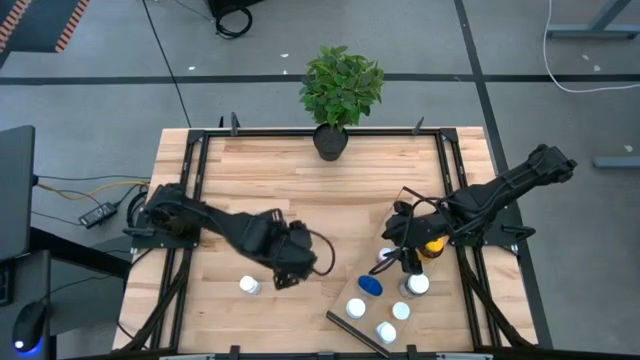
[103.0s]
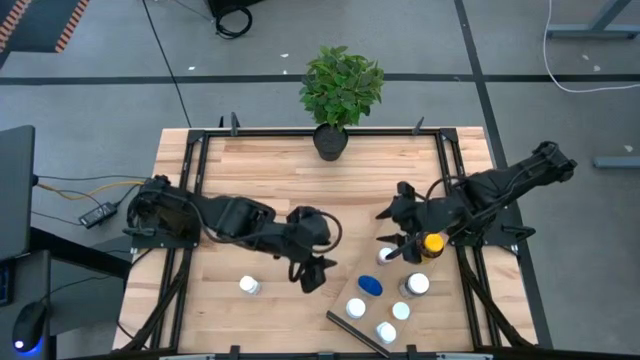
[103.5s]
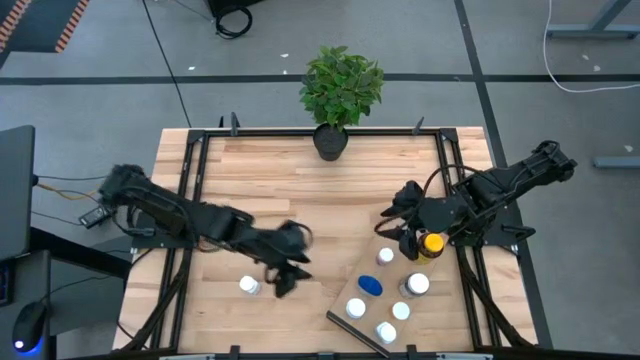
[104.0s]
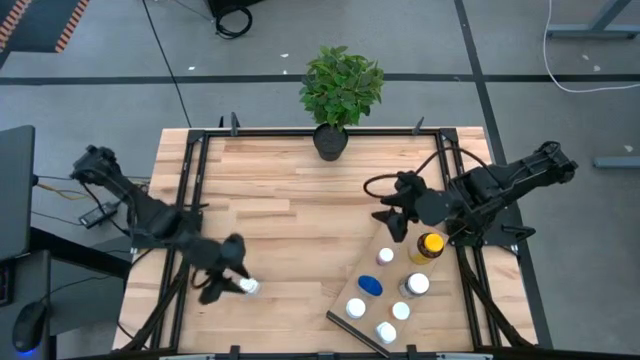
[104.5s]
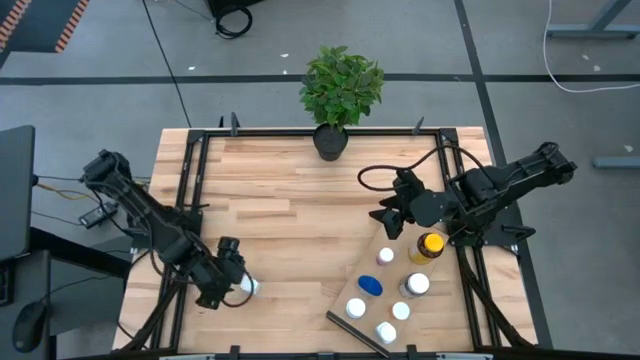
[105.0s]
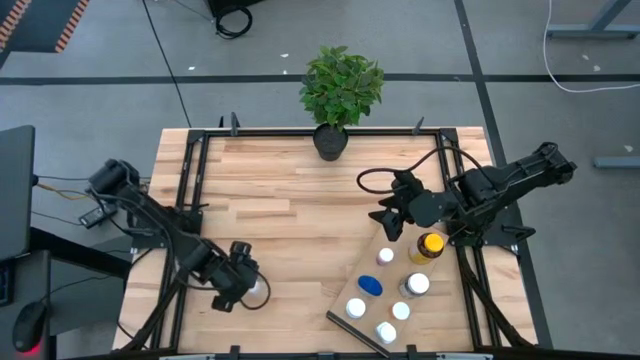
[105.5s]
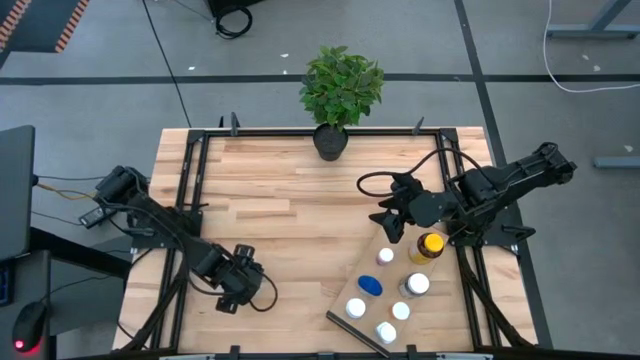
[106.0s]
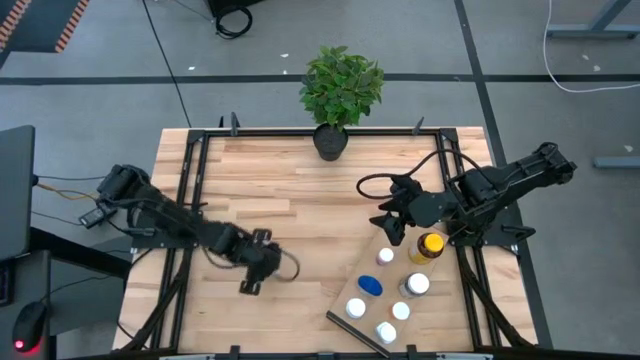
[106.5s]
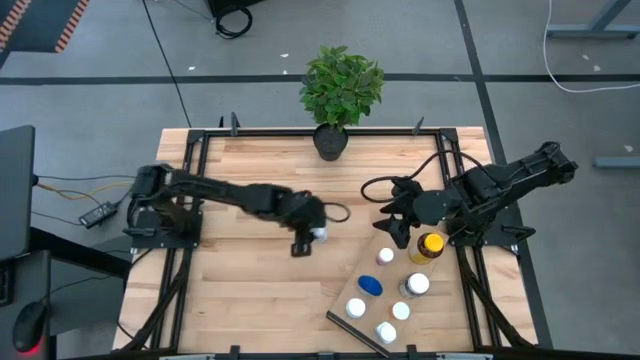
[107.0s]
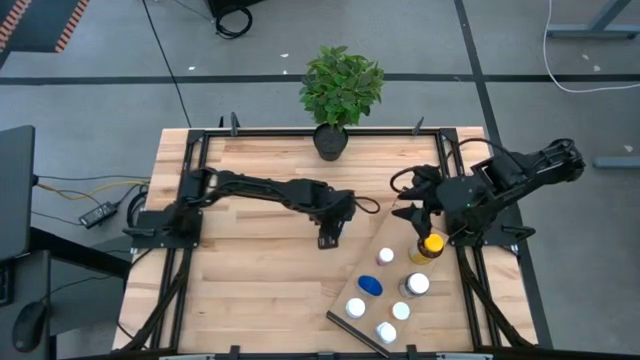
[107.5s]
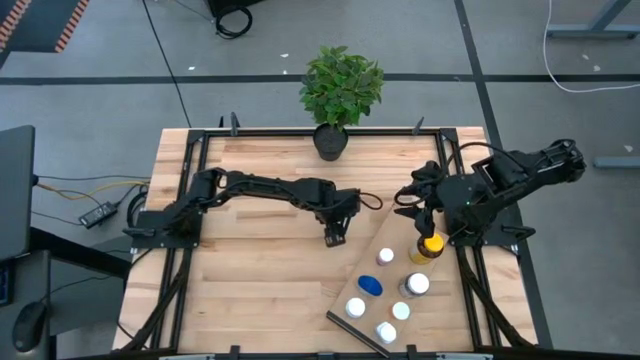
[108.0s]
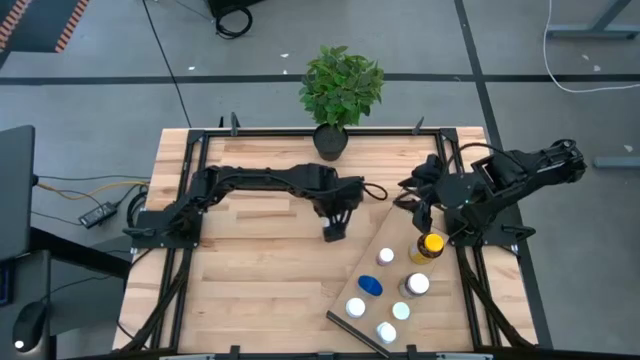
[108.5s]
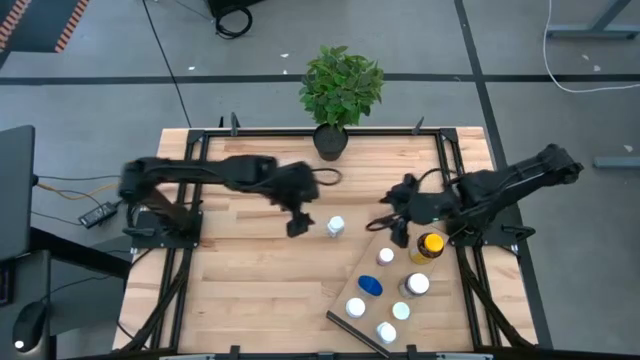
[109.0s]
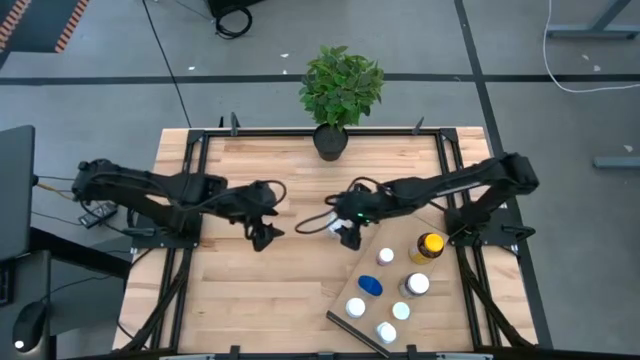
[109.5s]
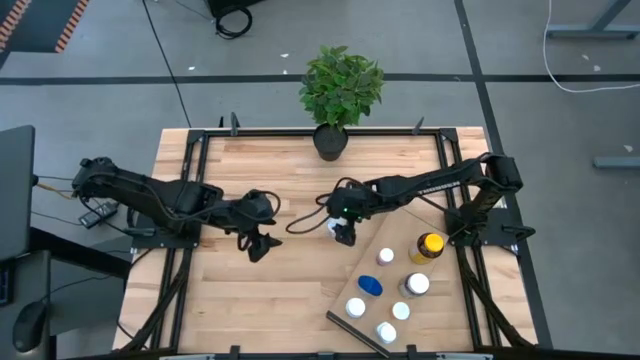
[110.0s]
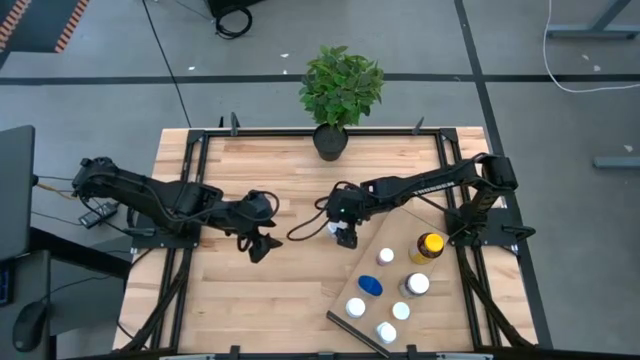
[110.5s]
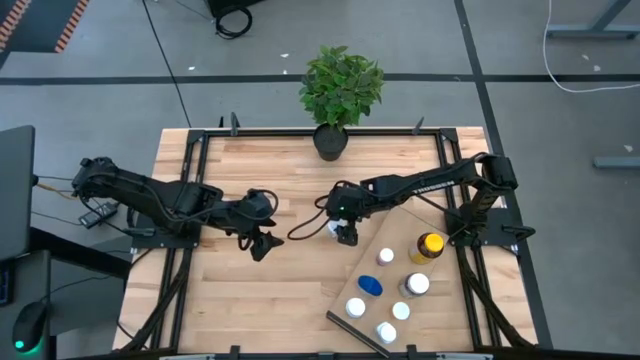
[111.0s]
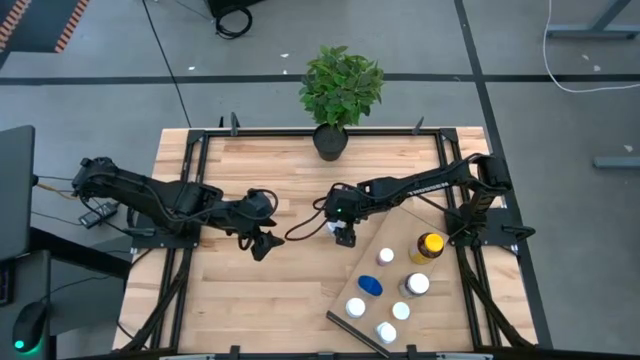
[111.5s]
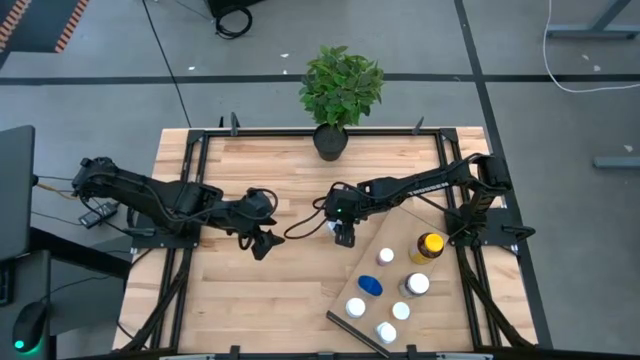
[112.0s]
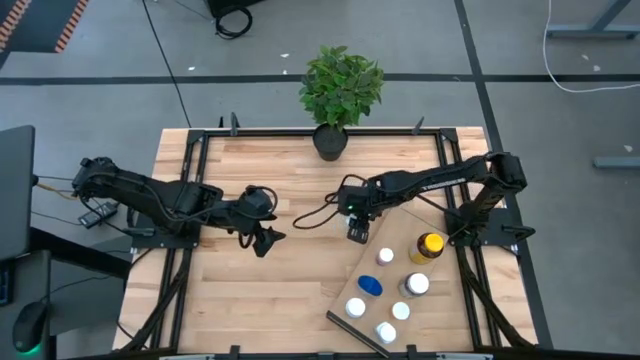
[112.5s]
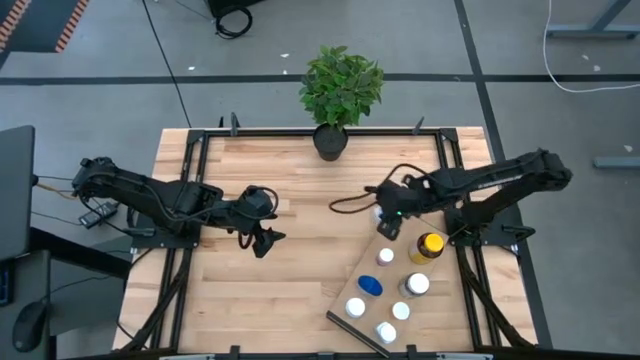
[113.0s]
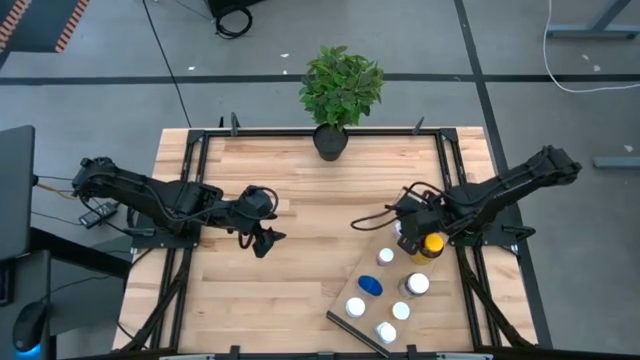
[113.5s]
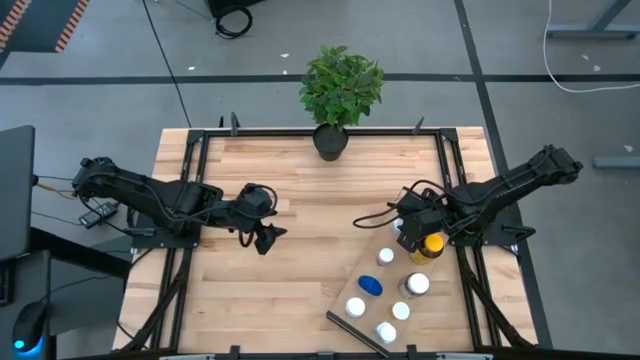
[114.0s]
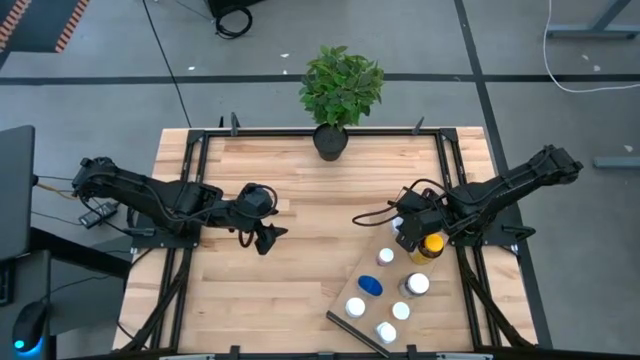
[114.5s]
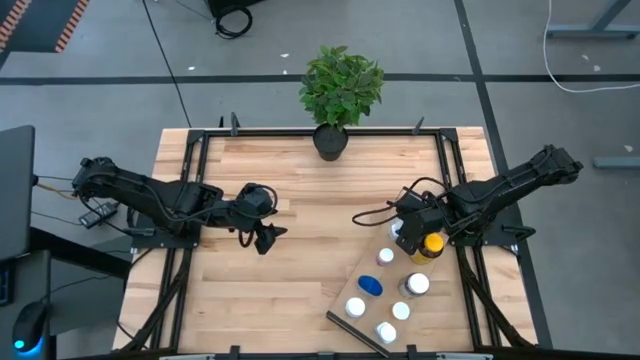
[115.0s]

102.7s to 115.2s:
Task: Pick and place medicine bottles onto shelf by color
Put the white medicine bottle on the shelf

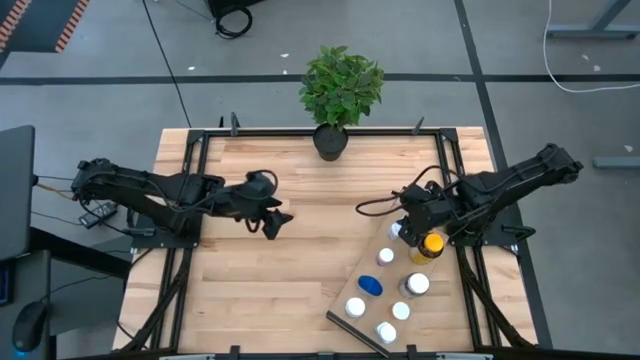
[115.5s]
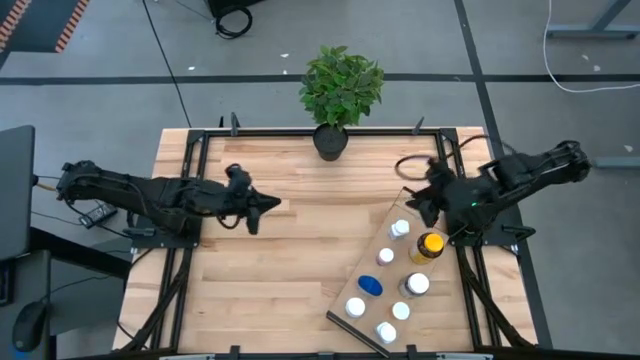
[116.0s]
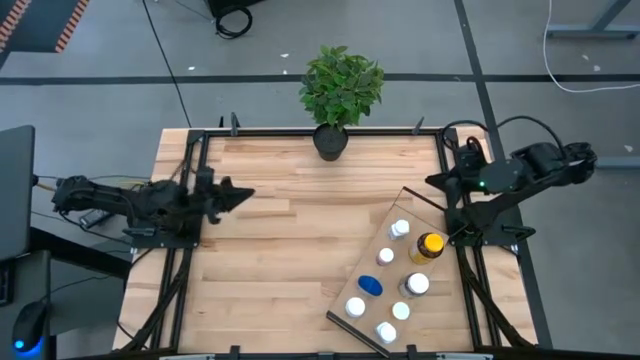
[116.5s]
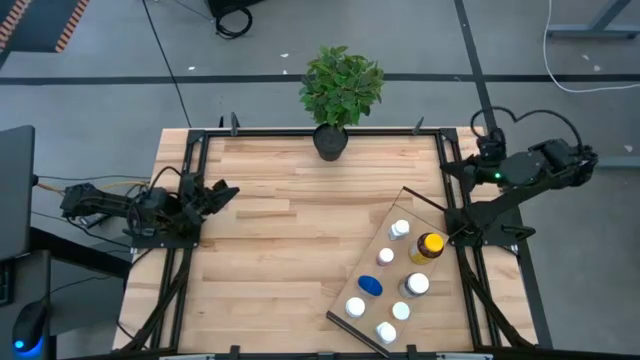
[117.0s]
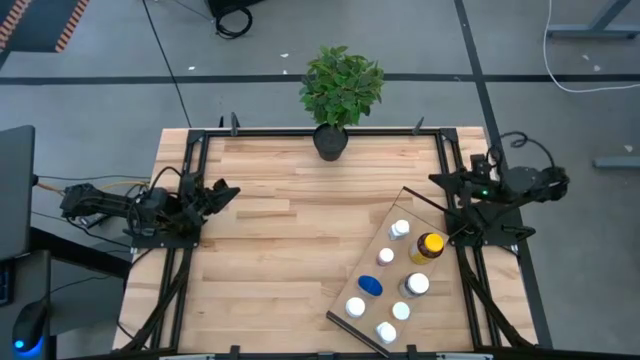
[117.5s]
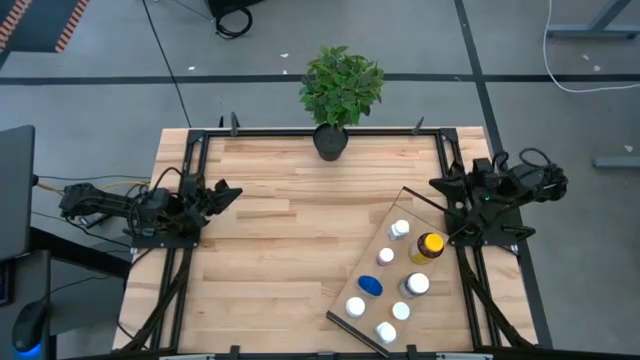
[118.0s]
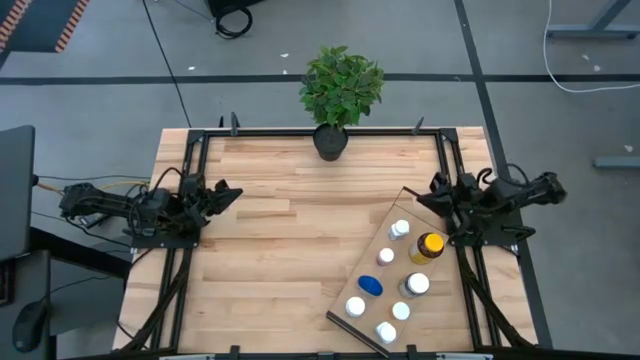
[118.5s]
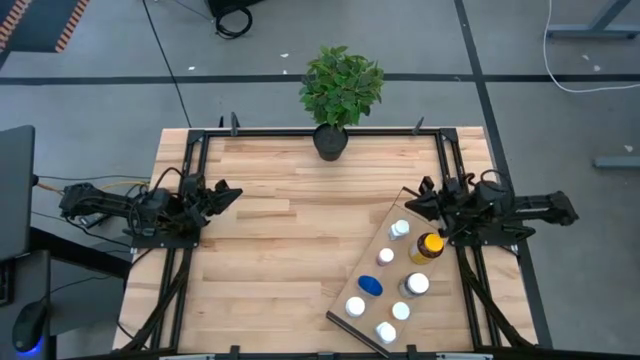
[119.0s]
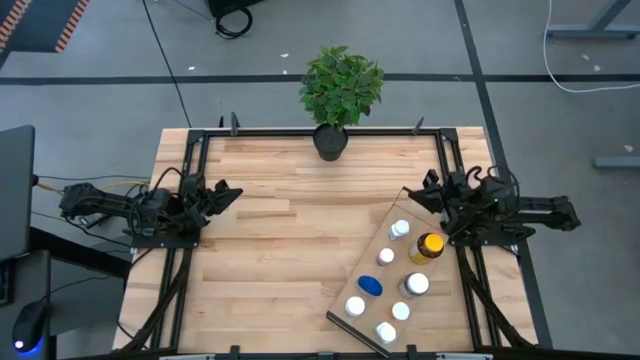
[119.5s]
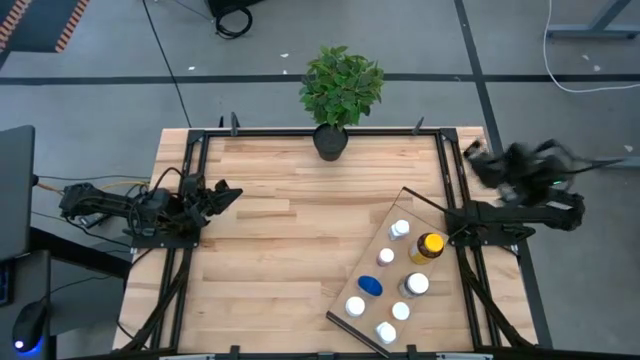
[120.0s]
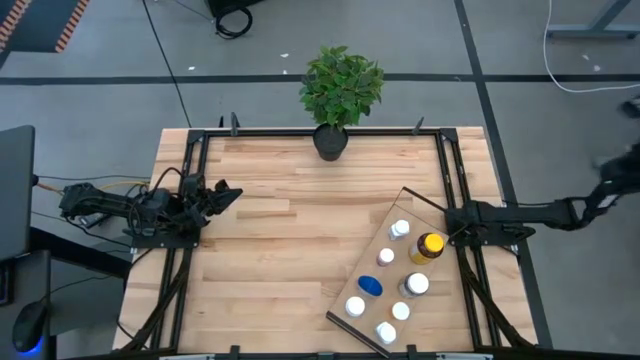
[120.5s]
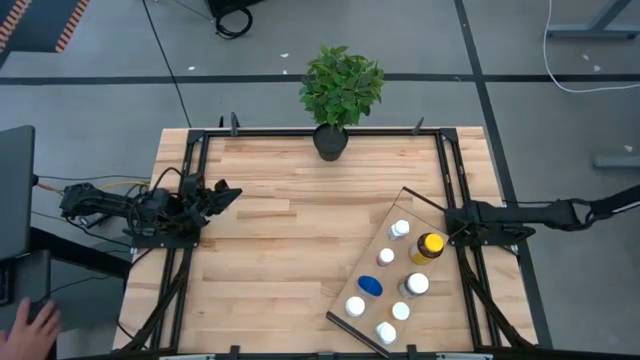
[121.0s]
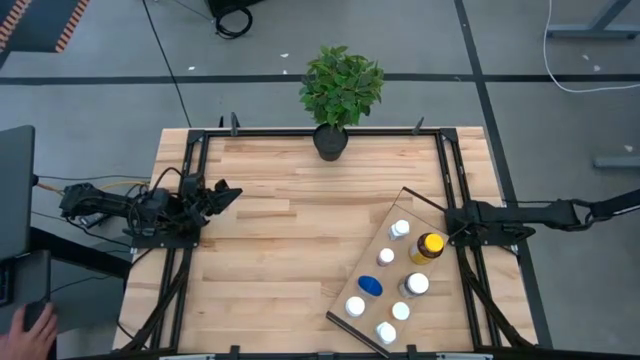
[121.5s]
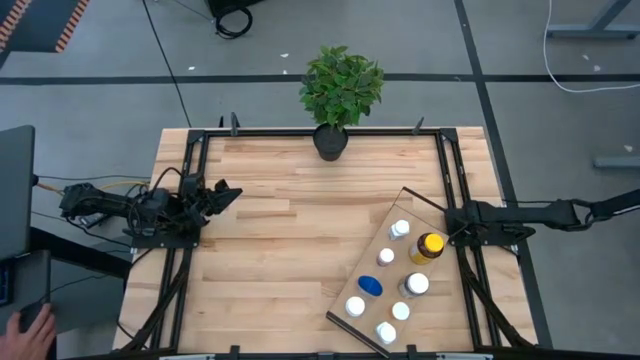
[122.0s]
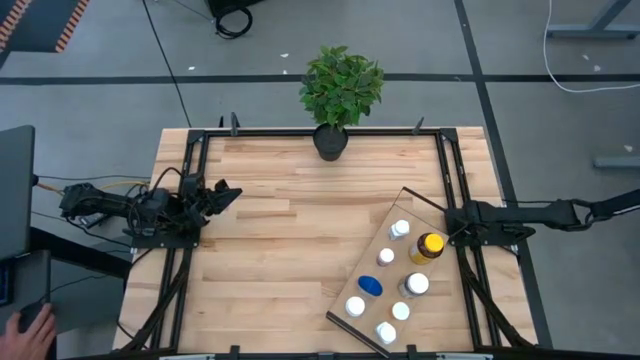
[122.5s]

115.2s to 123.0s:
Return to Home Position

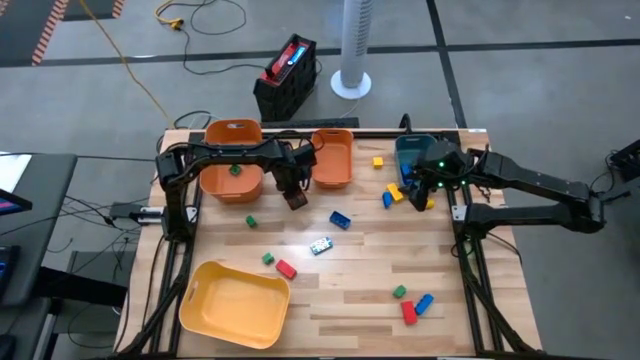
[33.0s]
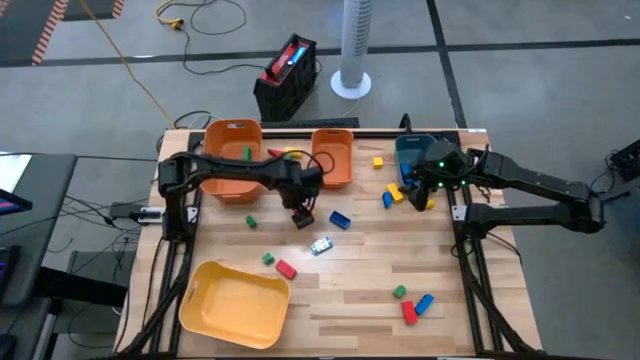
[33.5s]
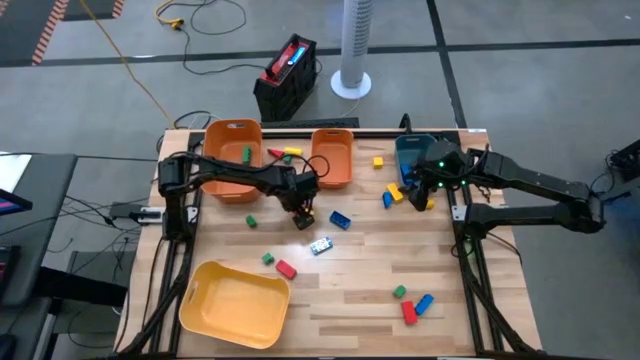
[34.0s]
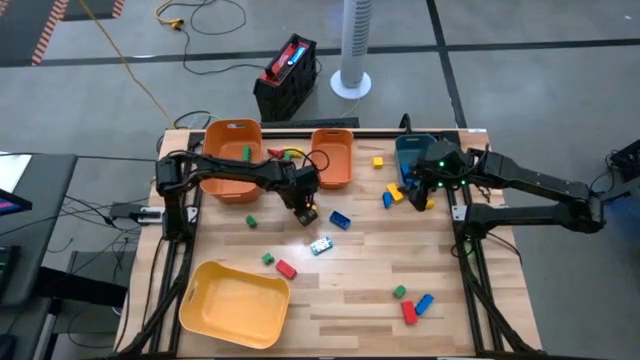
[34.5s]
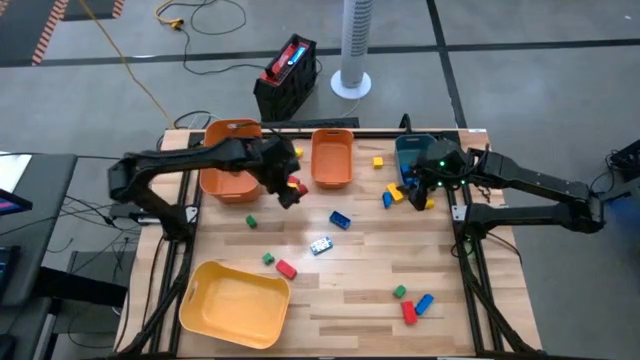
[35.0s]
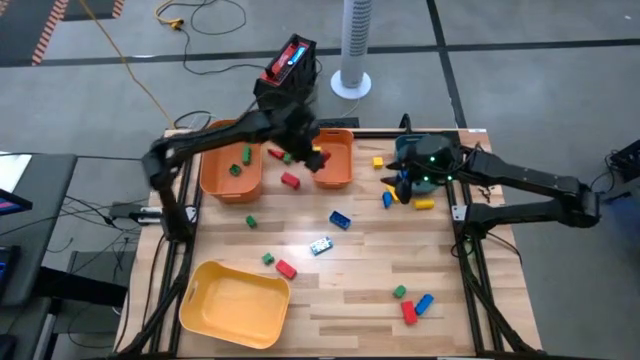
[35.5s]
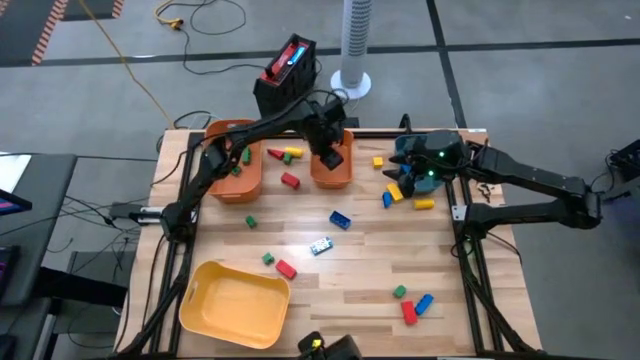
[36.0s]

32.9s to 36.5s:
Task: Sort blocks
Put the red block into the right orange bin
